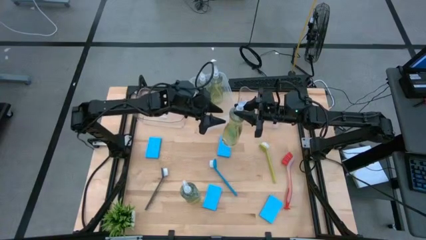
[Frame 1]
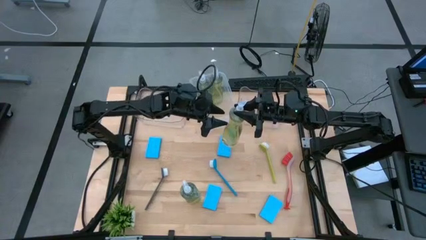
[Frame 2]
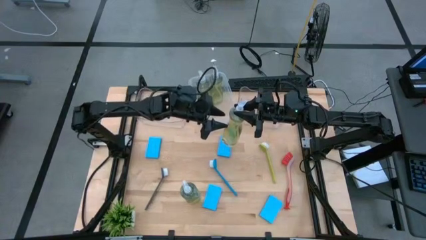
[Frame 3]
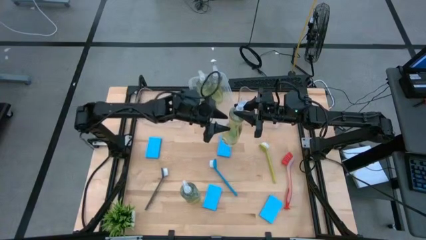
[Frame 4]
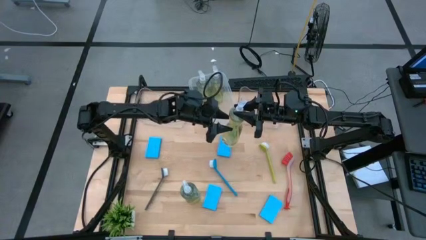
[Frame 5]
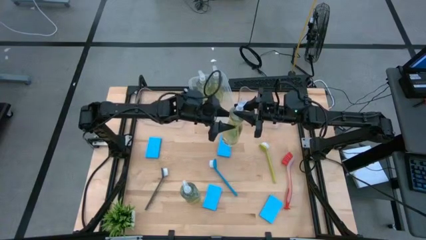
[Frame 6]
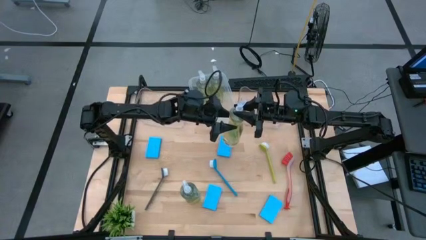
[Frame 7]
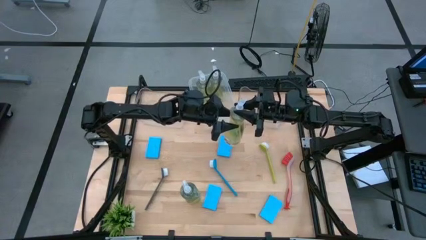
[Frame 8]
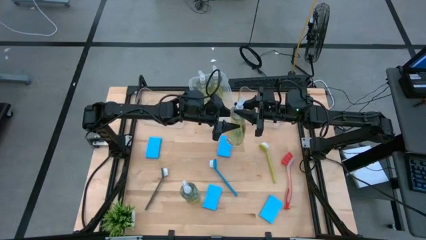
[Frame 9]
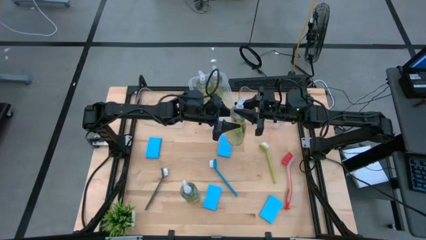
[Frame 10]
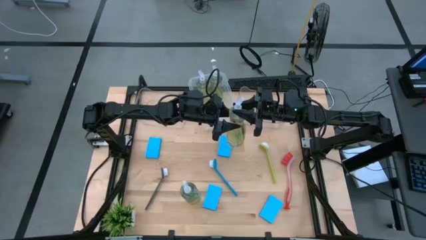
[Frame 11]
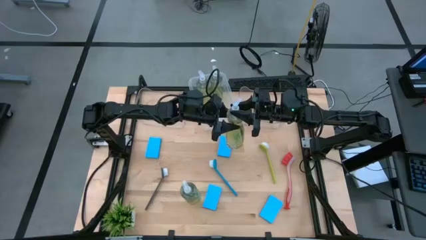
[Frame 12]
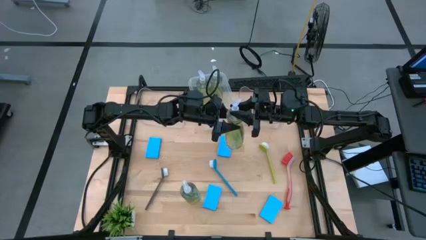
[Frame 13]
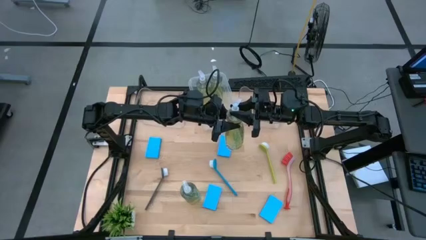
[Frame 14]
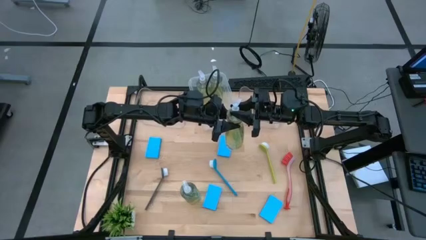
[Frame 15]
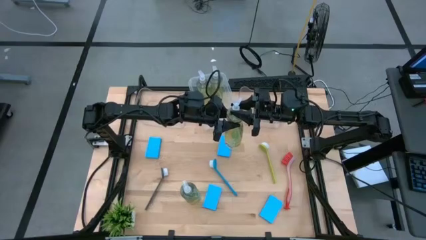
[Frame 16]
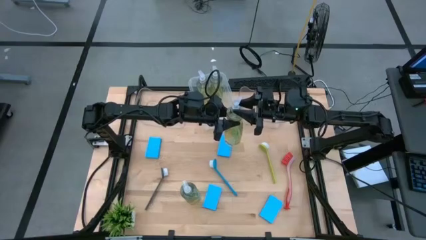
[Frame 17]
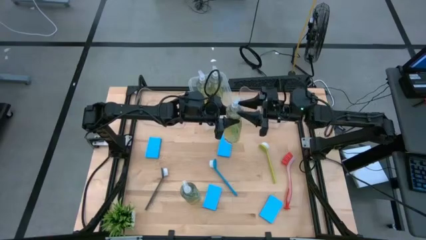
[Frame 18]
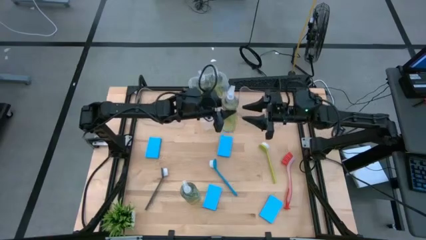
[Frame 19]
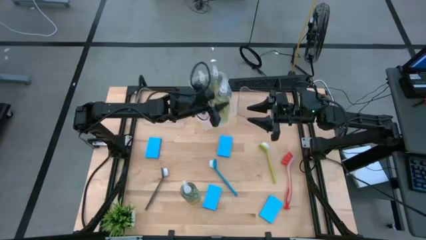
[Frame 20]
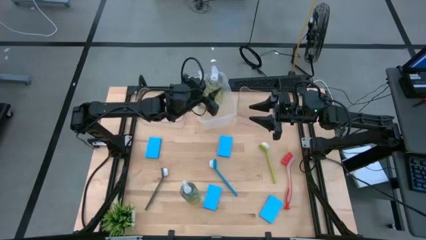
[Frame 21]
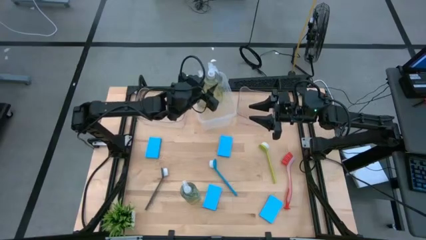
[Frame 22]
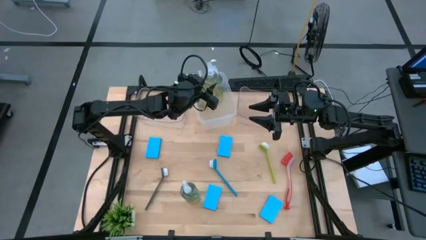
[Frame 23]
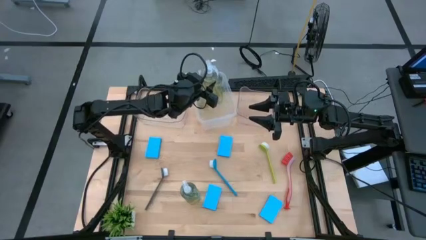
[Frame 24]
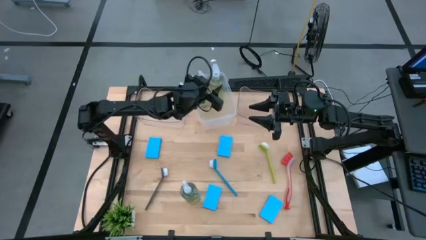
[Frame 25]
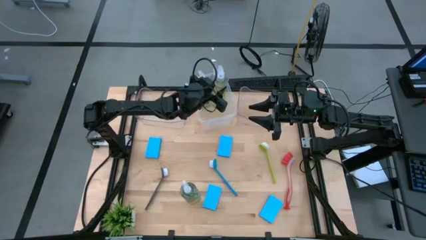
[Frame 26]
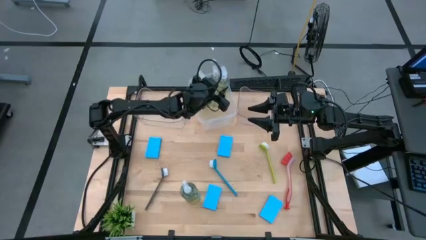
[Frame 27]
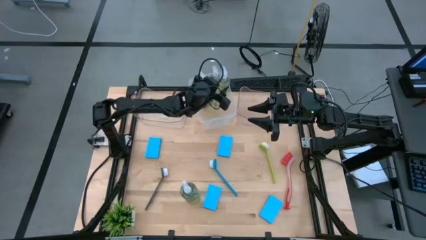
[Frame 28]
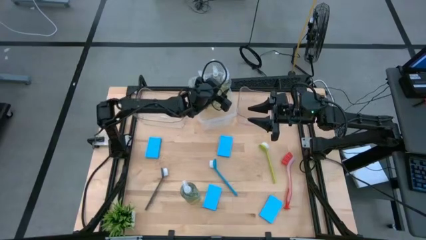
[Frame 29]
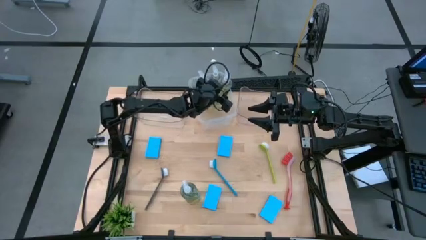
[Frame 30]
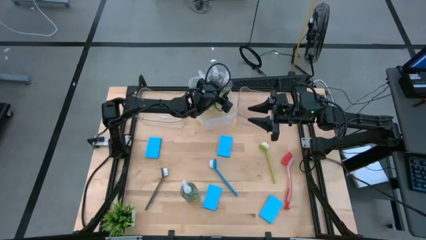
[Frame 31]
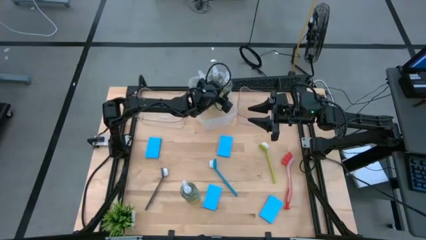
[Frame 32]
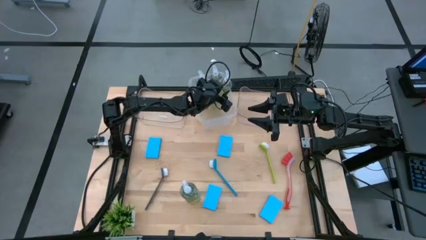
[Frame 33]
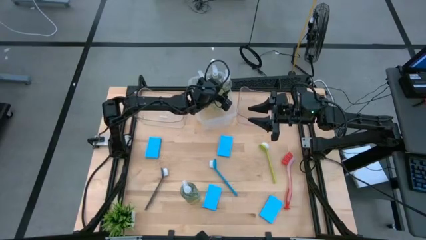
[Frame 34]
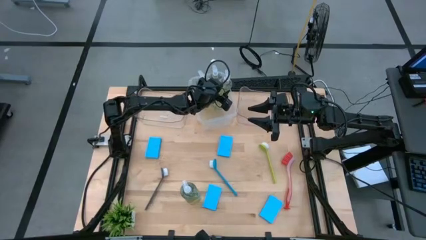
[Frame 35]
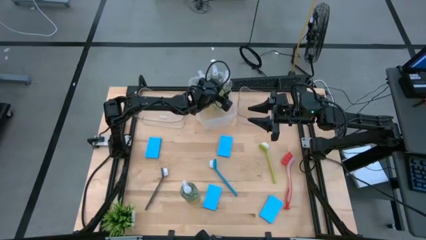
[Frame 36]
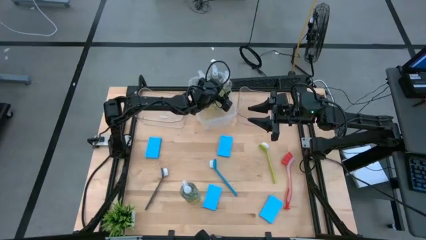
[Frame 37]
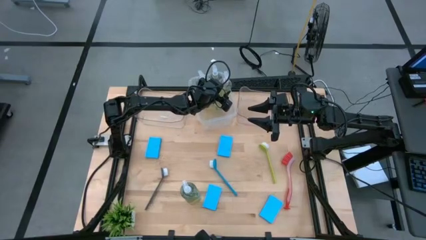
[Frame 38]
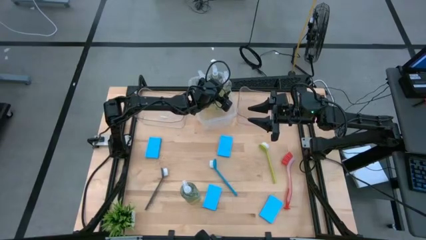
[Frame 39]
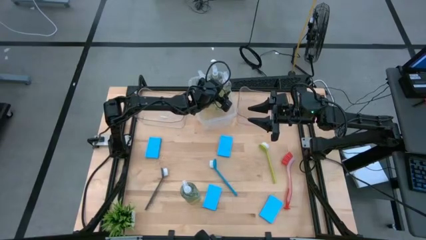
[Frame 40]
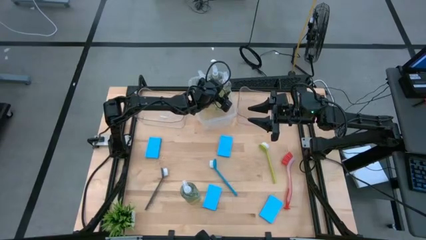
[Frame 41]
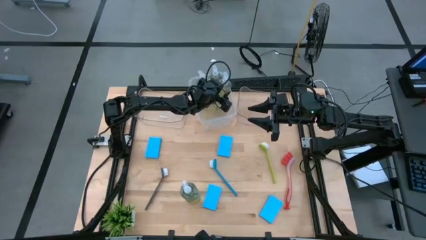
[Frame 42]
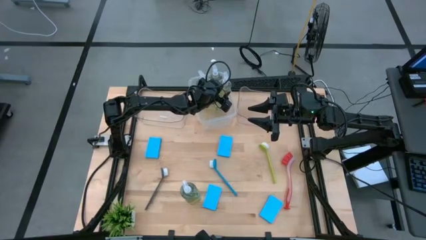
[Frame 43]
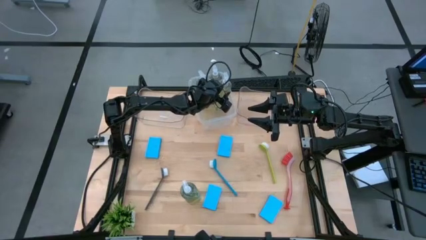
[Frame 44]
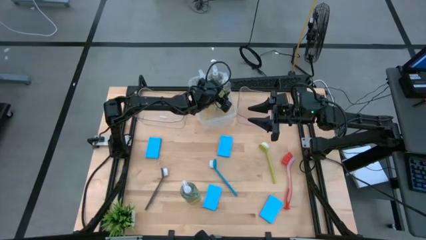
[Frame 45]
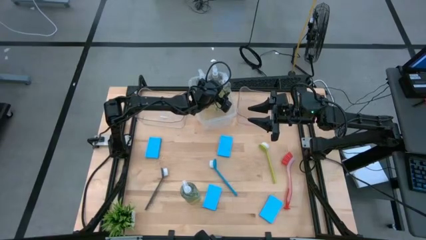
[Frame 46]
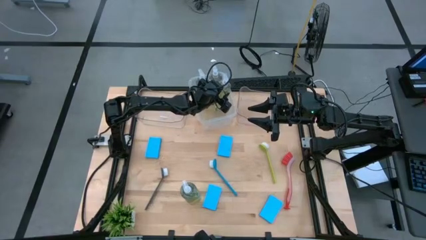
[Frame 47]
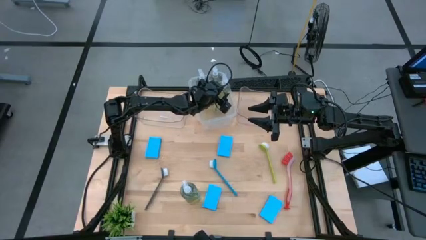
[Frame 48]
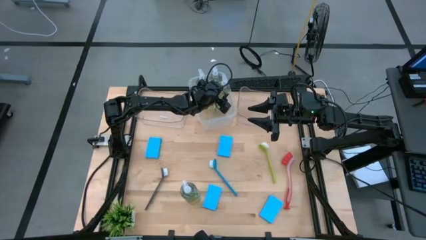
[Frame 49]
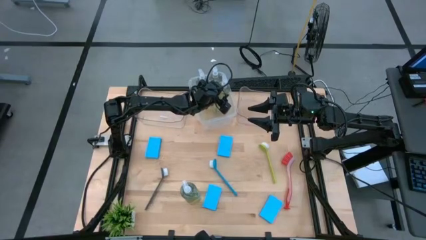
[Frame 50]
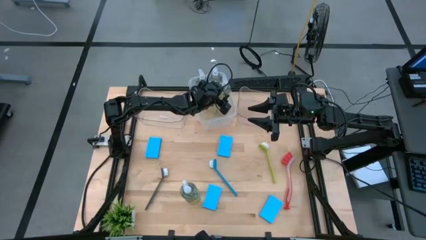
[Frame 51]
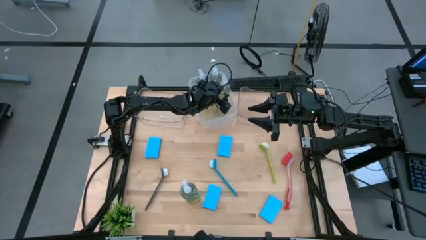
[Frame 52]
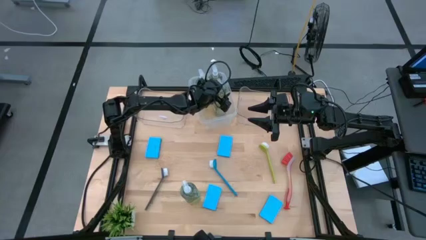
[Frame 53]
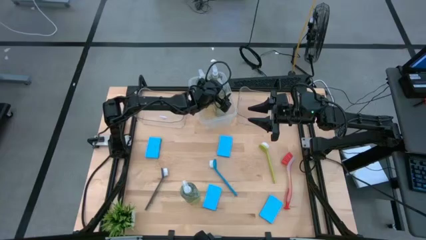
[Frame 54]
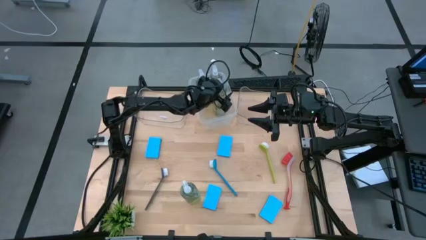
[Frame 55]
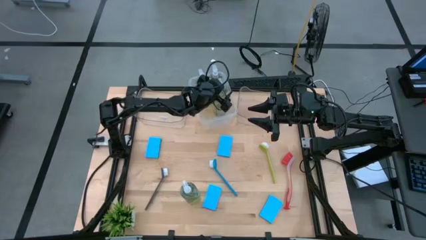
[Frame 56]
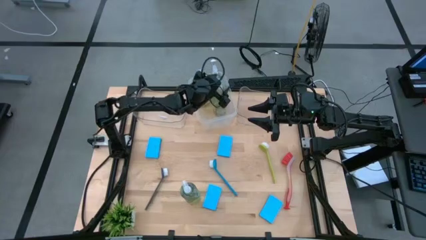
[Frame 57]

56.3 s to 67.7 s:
Task: Pick & Place Kitchen Sink Supplies
Put the dish soap into the white bin
